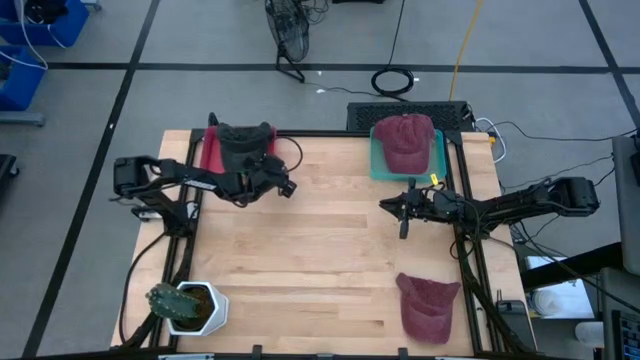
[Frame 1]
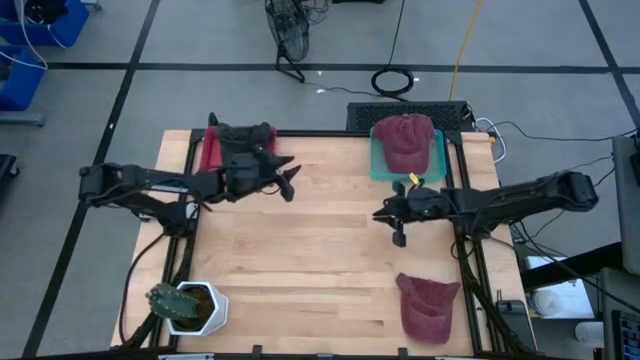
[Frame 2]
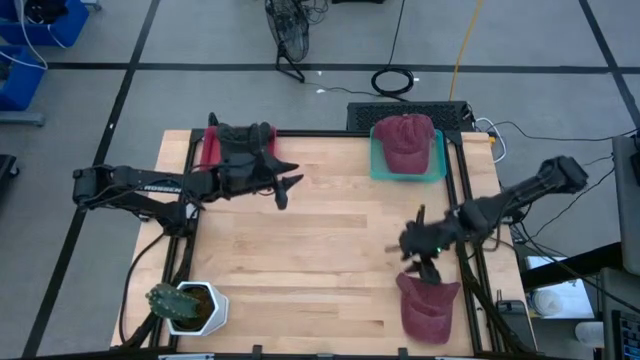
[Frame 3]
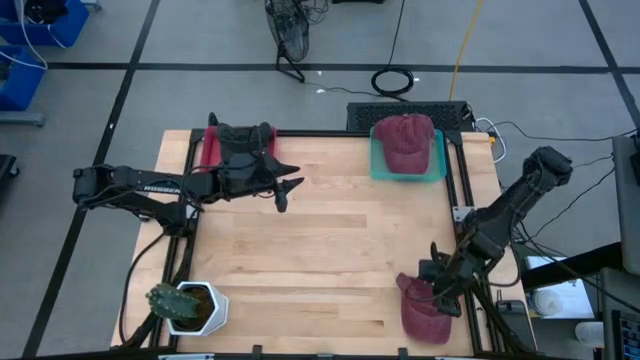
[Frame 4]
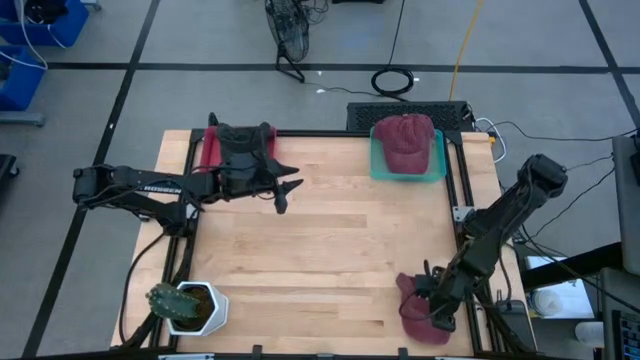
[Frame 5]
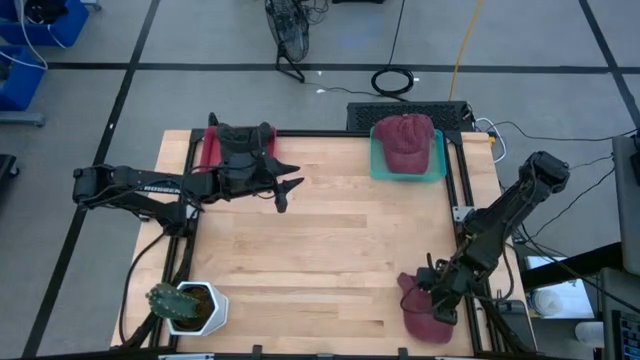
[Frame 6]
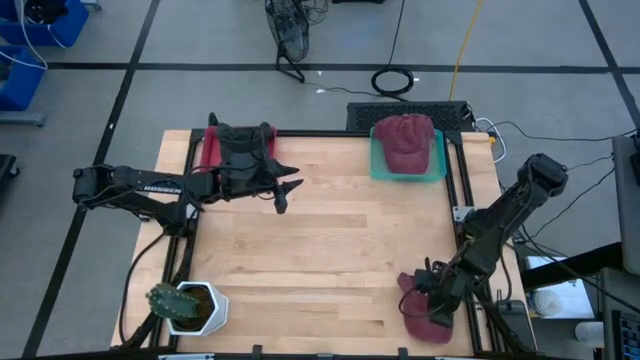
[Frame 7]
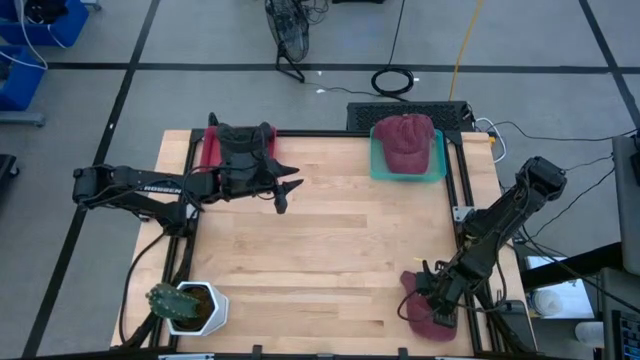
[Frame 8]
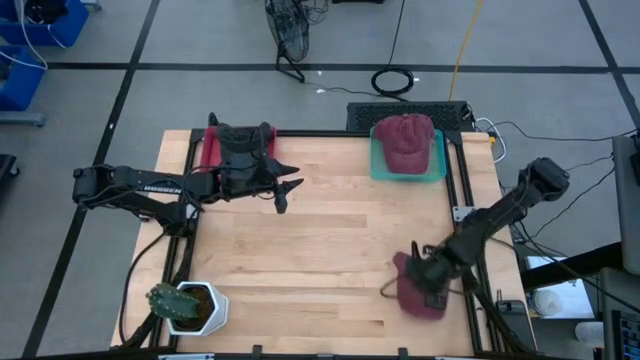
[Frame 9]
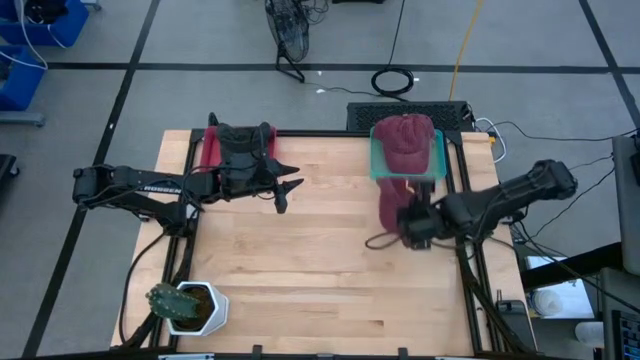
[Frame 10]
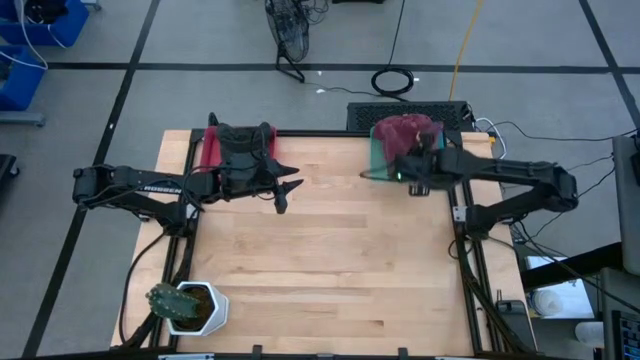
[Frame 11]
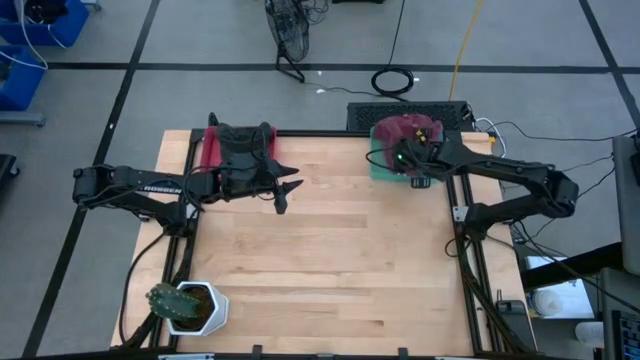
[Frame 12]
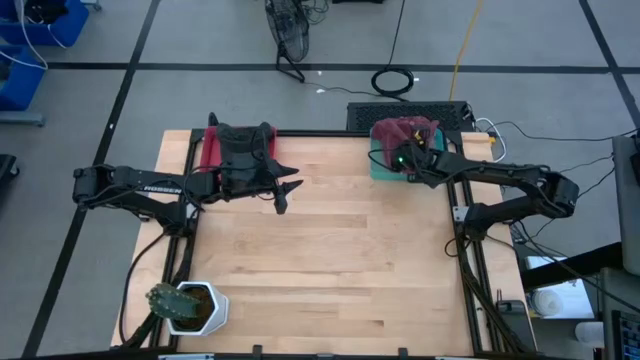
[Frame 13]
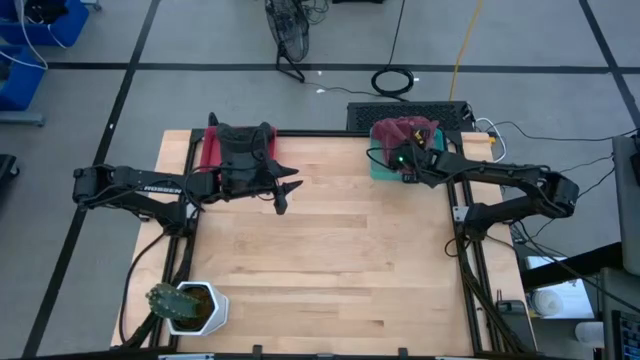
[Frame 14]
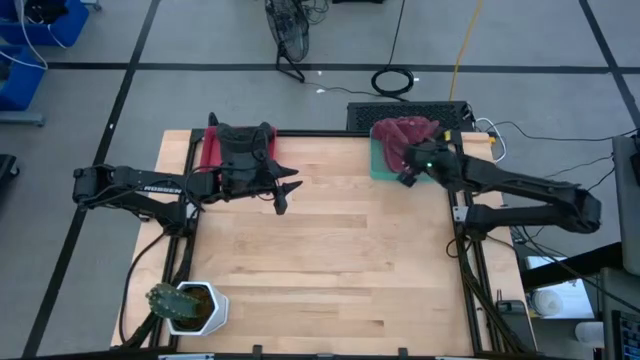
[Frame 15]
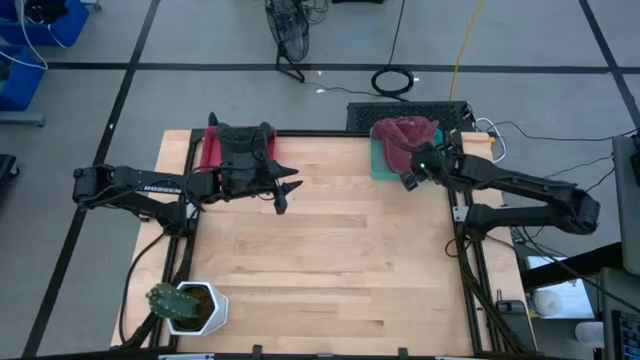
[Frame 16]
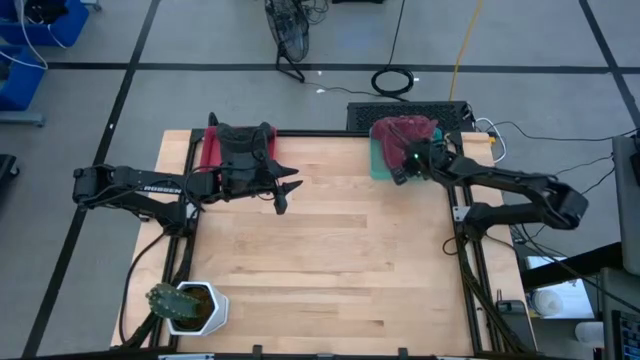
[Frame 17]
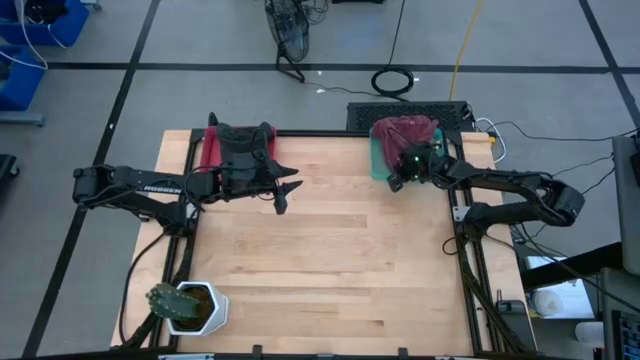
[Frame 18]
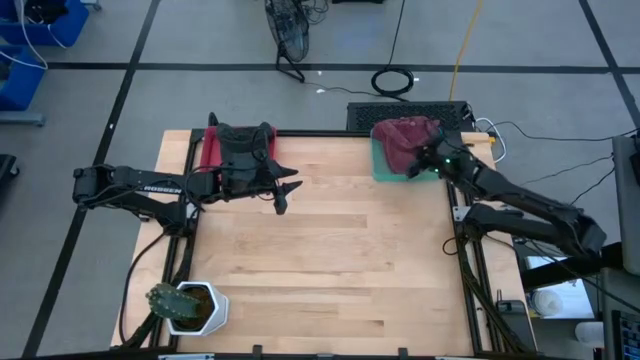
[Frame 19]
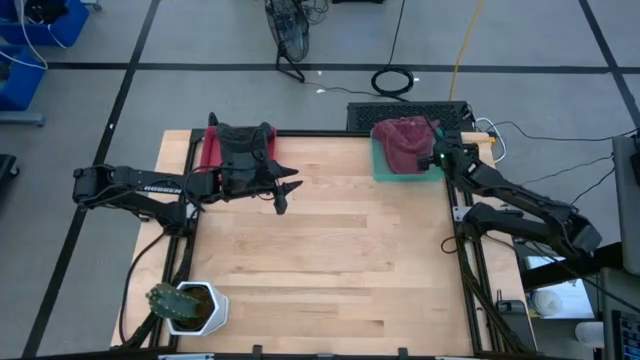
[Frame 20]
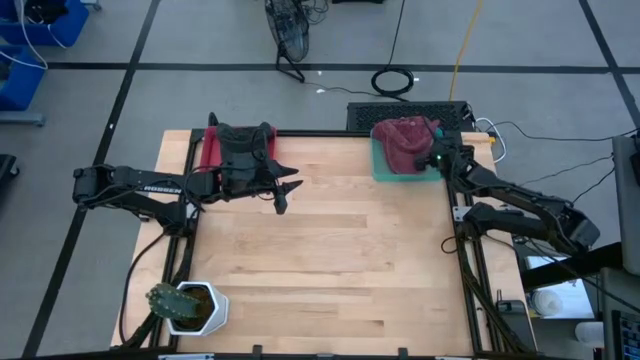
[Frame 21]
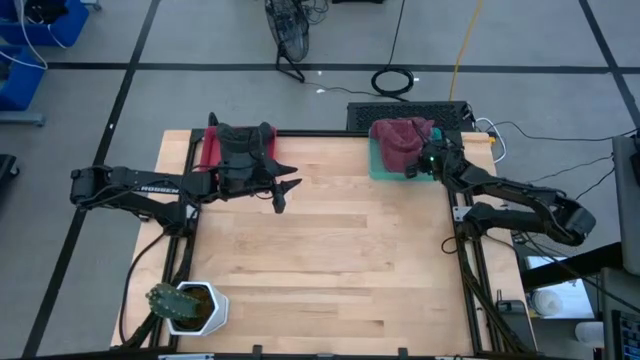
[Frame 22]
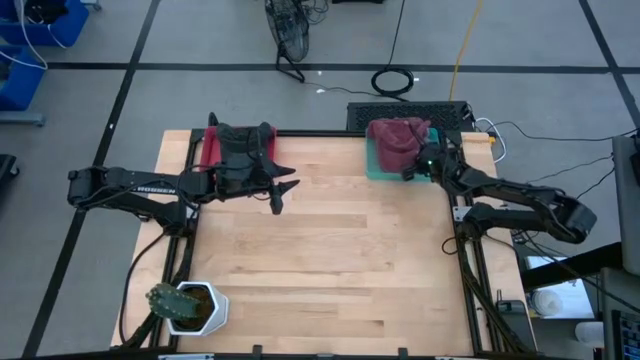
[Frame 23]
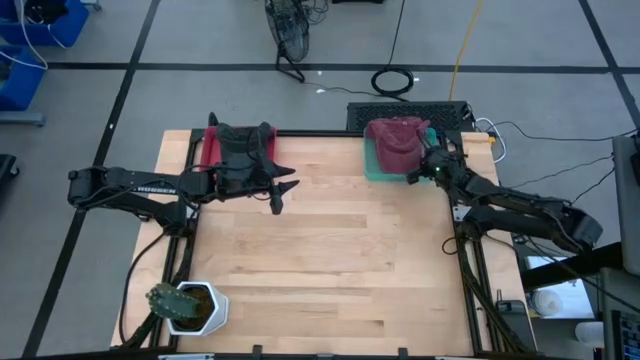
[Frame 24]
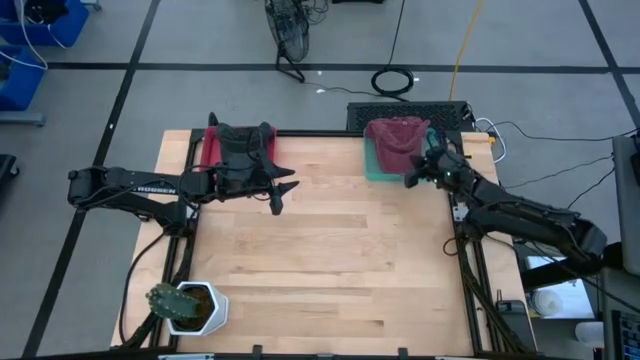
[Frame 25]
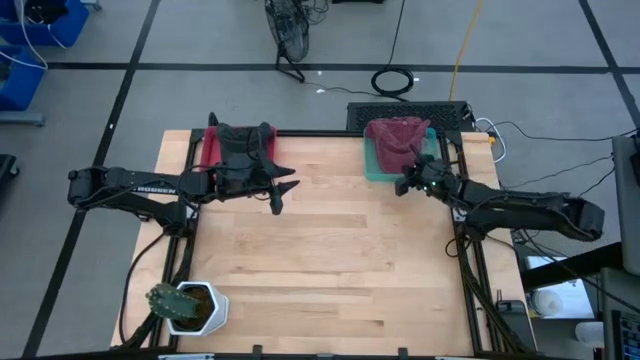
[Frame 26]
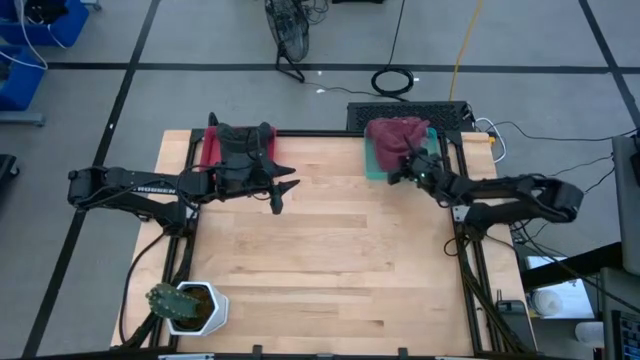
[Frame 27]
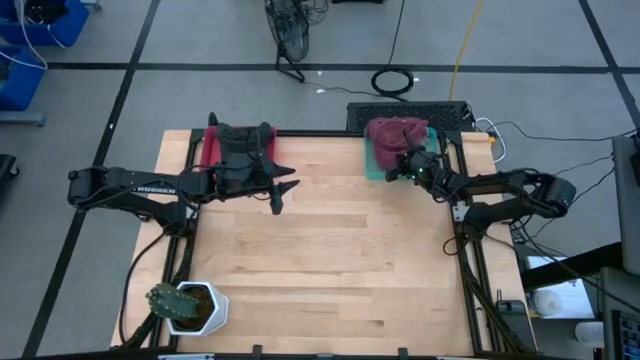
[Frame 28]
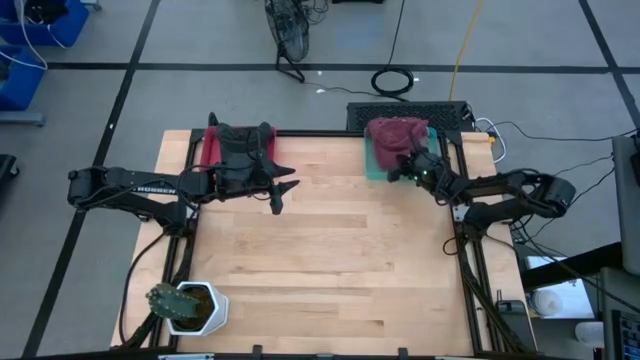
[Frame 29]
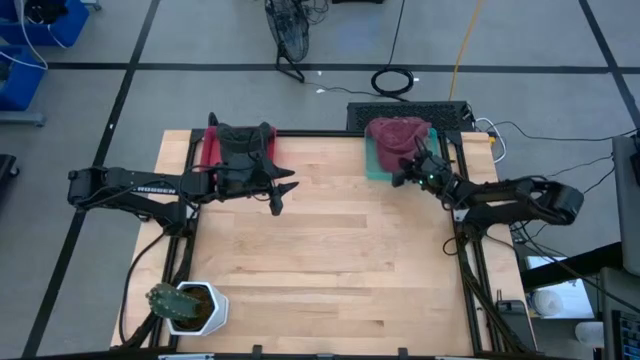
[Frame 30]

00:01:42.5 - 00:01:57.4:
Task: Pick & Place hat
Put the red cap into the green bin

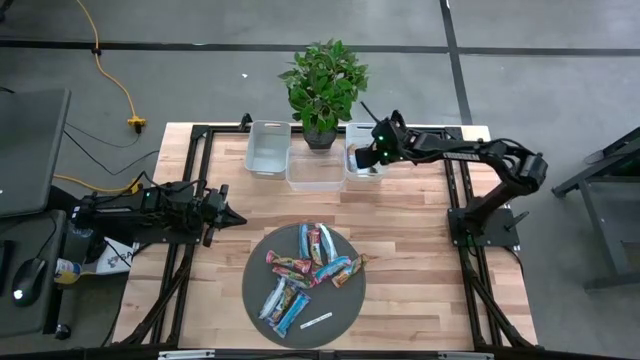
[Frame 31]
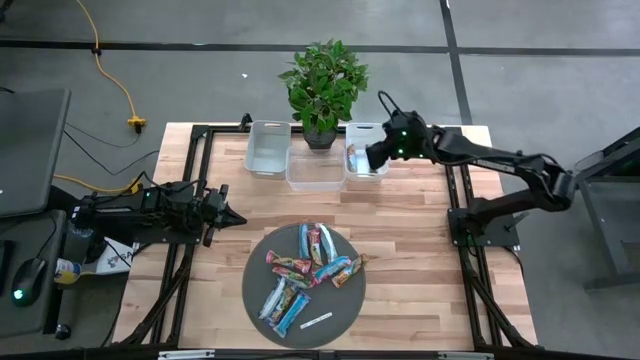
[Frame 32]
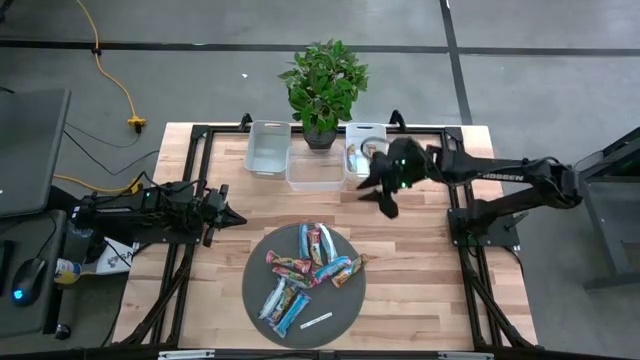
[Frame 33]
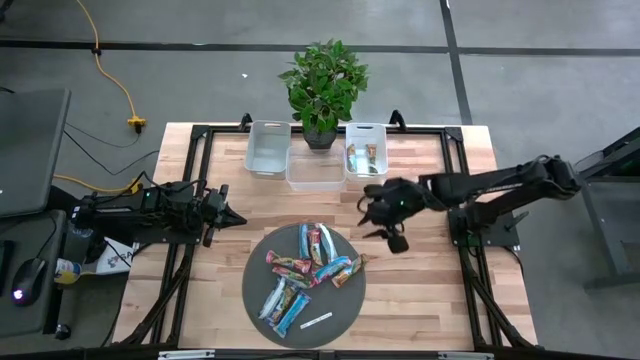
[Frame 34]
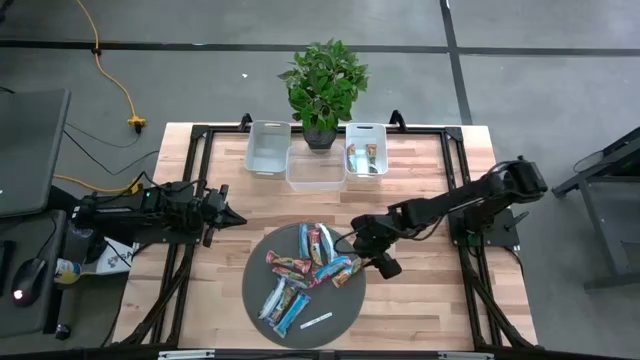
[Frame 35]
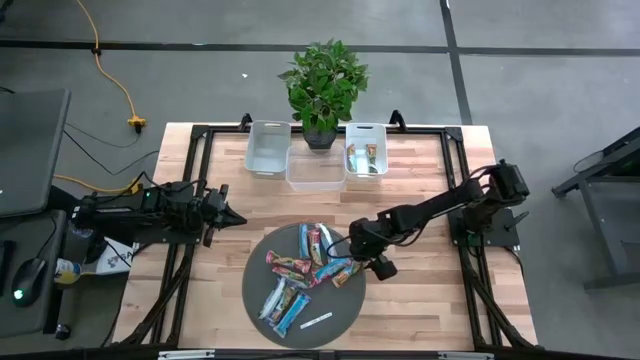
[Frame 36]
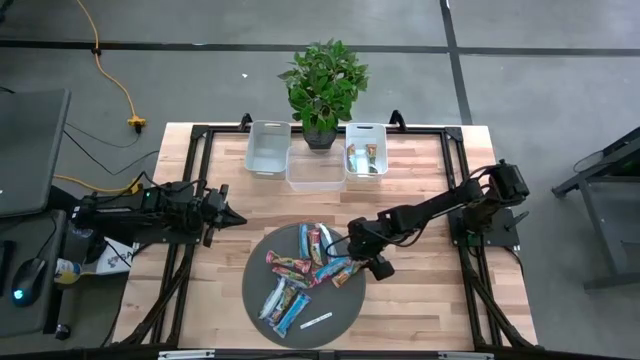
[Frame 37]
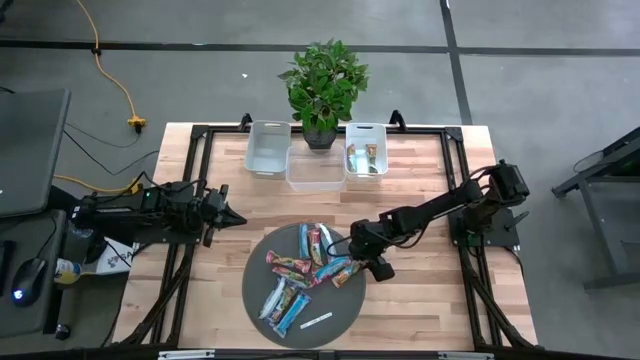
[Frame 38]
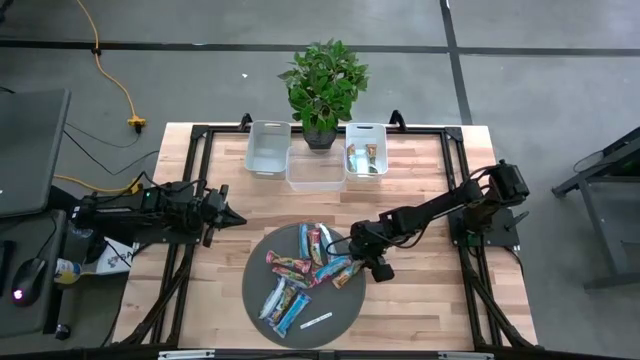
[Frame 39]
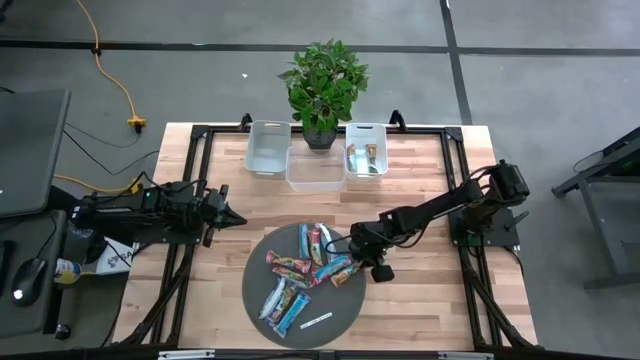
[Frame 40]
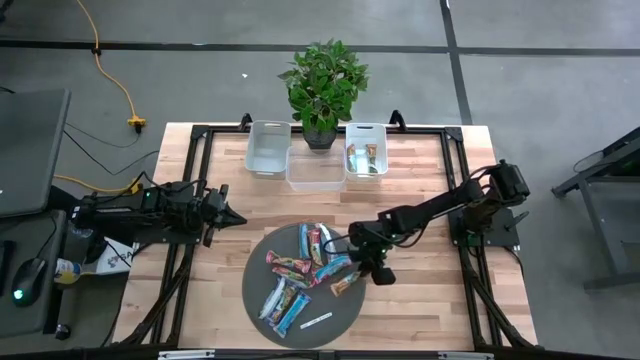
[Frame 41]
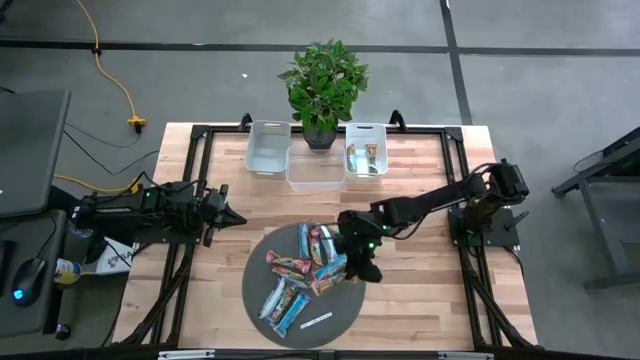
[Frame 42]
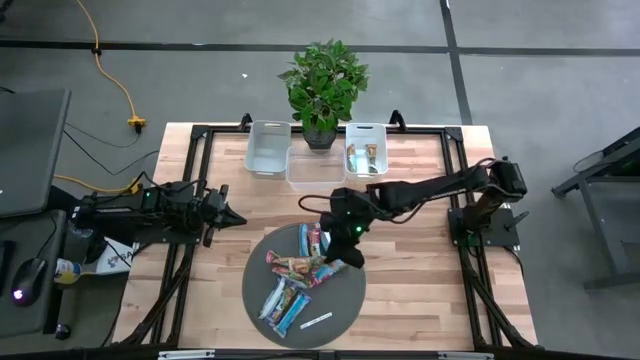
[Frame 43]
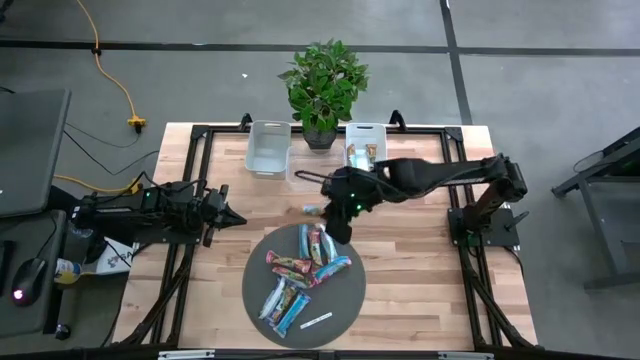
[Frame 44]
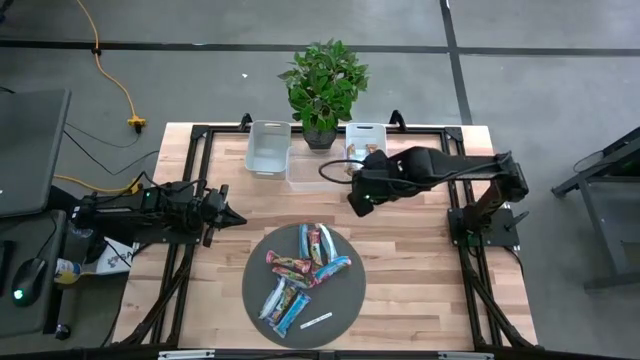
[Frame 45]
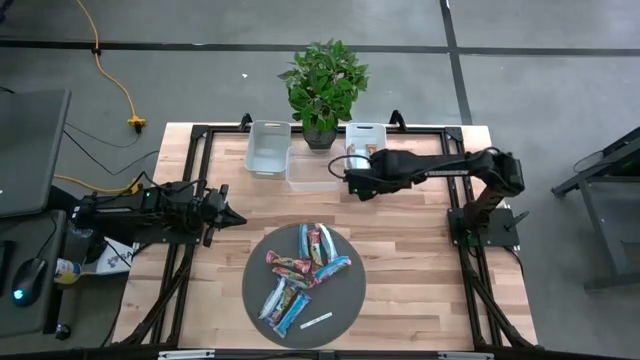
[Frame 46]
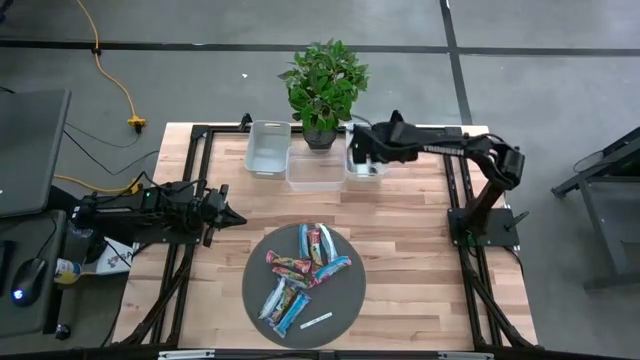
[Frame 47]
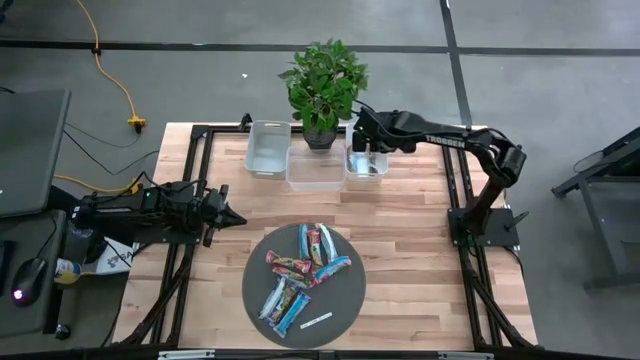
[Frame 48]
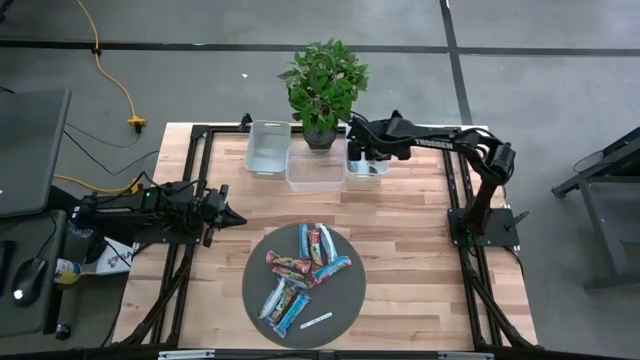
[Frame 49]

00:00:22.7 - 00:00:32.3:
Task: Pick and place Granola Bars by type
Put the yellow granola bar into the white bin
